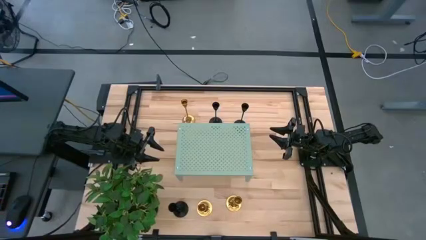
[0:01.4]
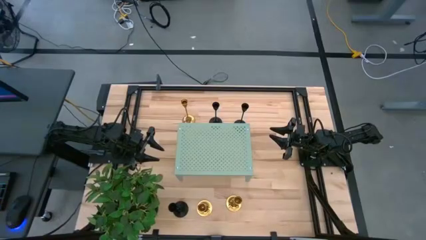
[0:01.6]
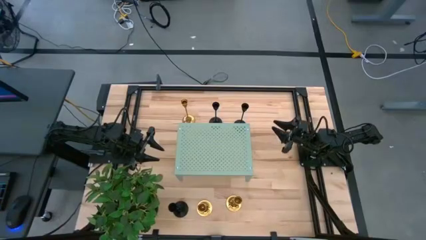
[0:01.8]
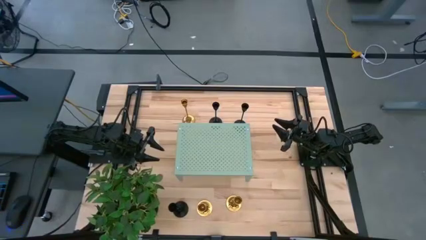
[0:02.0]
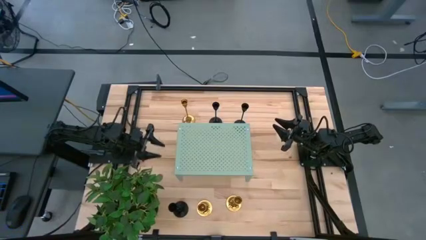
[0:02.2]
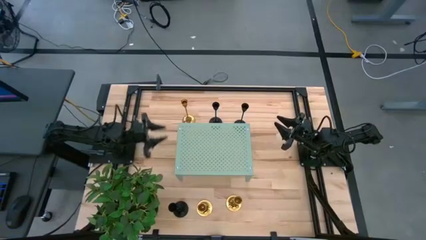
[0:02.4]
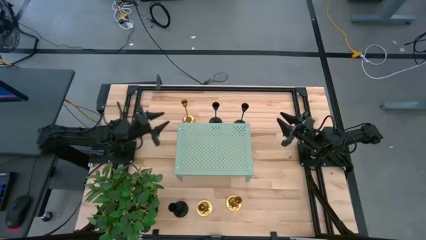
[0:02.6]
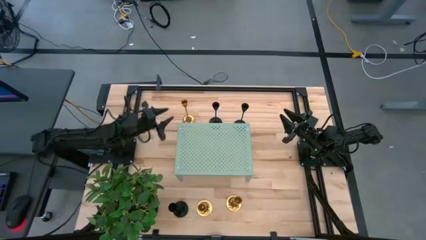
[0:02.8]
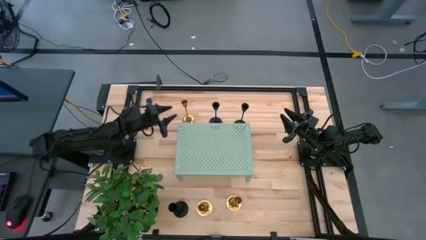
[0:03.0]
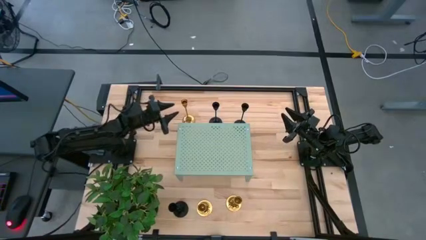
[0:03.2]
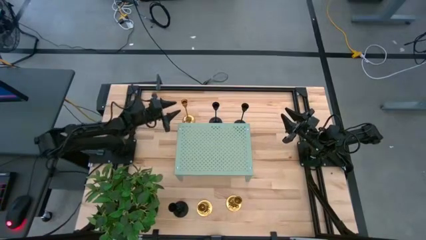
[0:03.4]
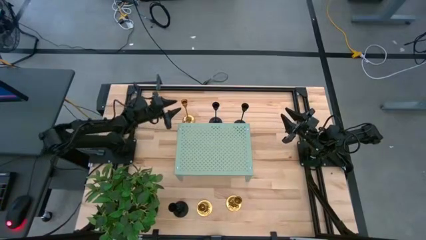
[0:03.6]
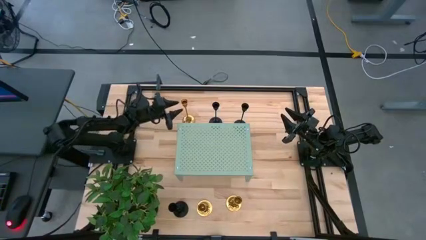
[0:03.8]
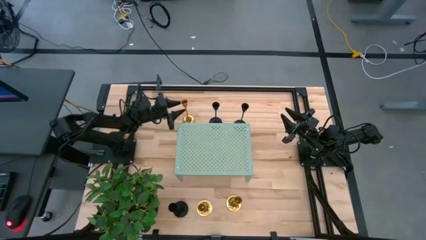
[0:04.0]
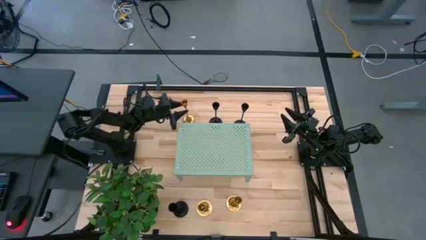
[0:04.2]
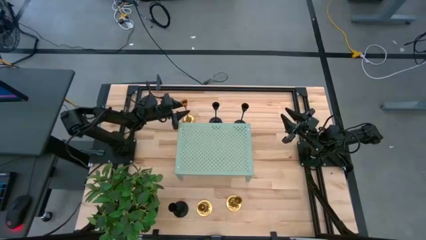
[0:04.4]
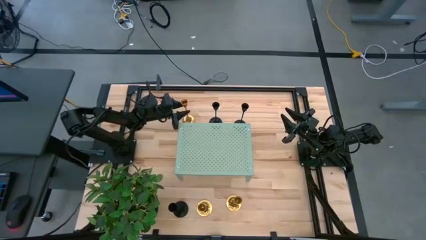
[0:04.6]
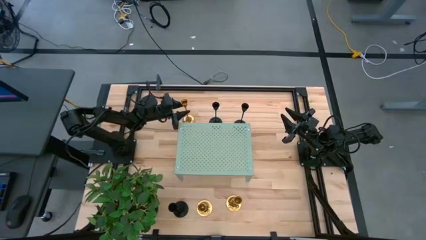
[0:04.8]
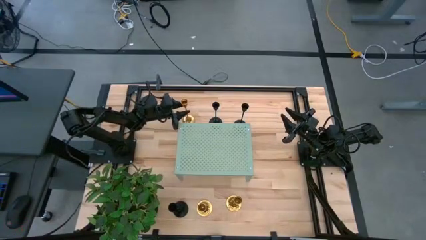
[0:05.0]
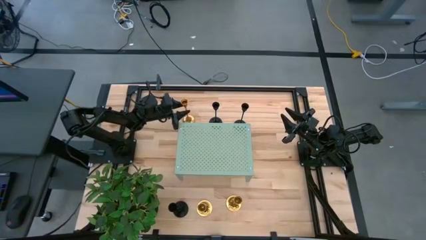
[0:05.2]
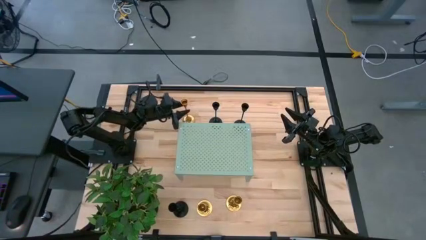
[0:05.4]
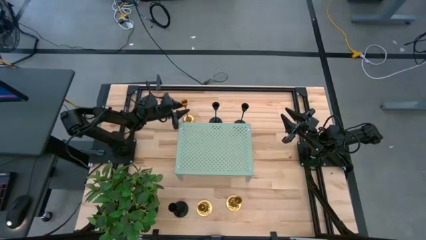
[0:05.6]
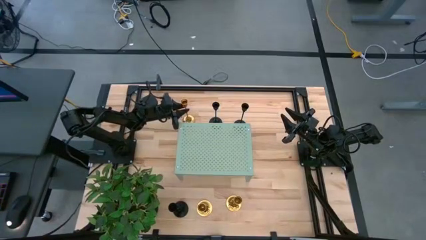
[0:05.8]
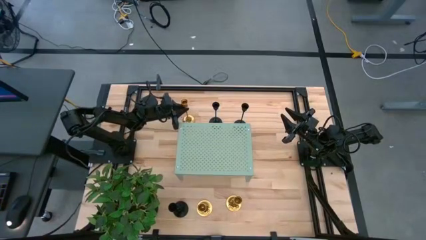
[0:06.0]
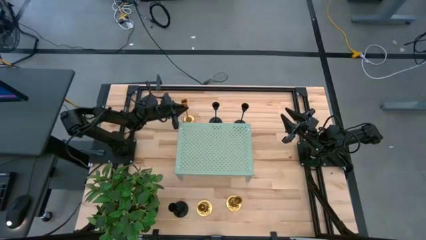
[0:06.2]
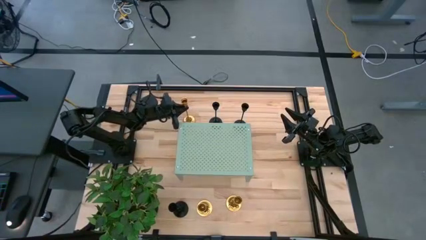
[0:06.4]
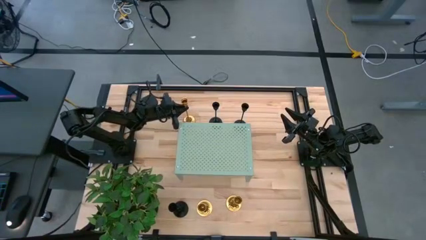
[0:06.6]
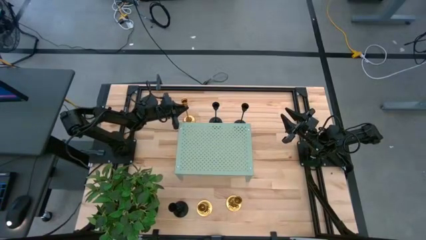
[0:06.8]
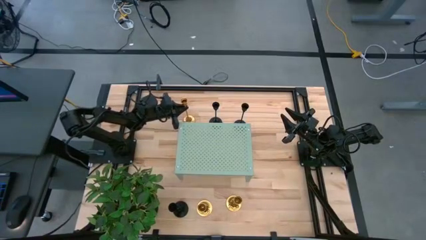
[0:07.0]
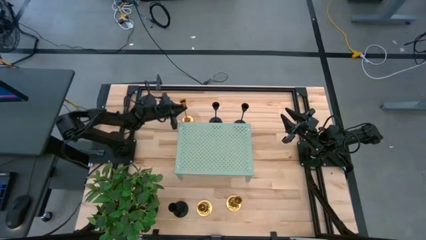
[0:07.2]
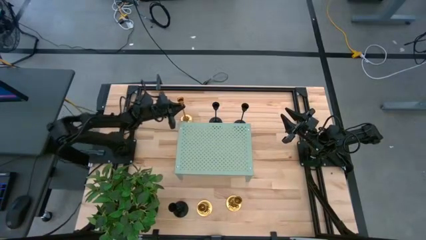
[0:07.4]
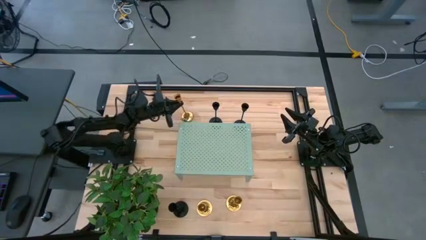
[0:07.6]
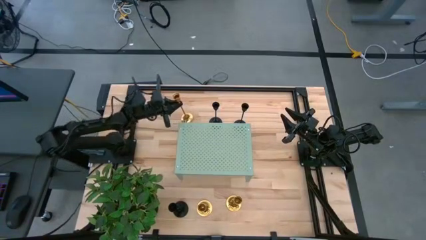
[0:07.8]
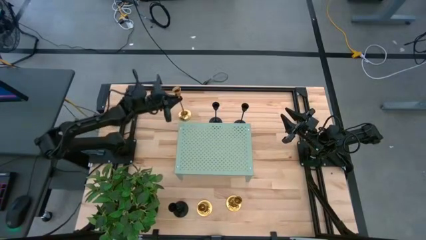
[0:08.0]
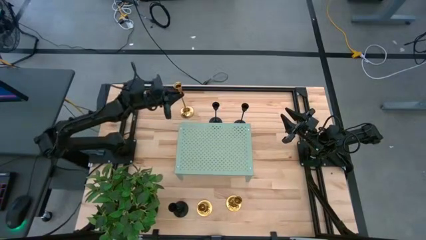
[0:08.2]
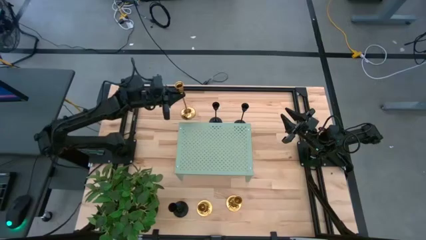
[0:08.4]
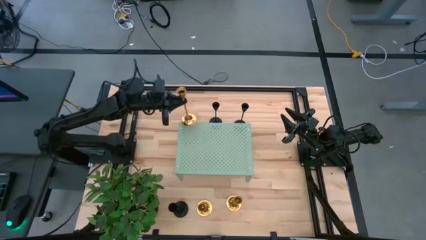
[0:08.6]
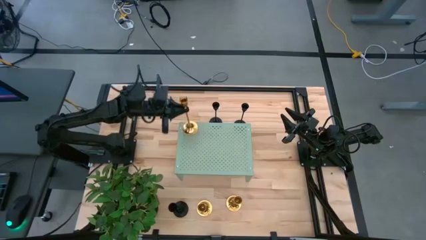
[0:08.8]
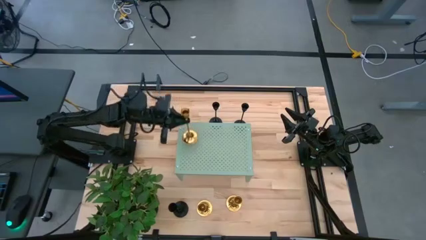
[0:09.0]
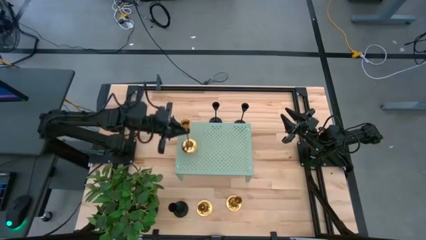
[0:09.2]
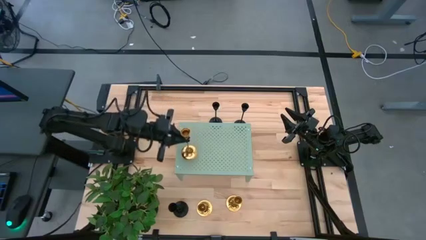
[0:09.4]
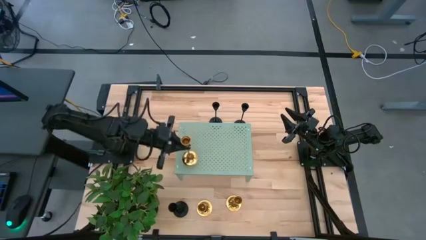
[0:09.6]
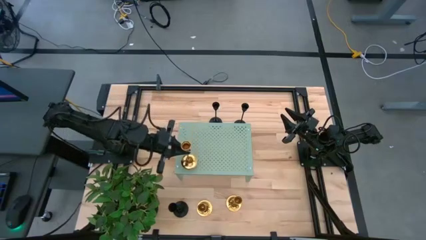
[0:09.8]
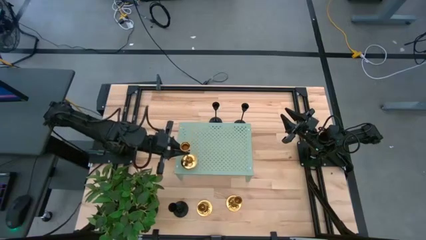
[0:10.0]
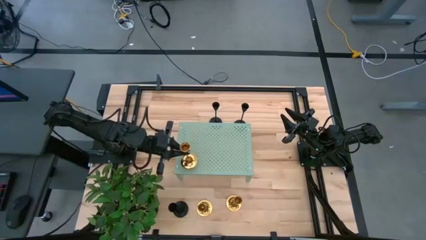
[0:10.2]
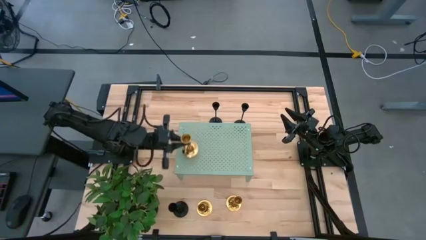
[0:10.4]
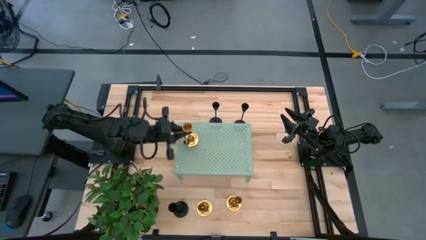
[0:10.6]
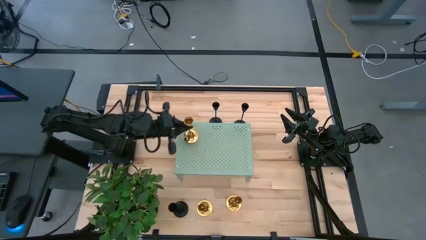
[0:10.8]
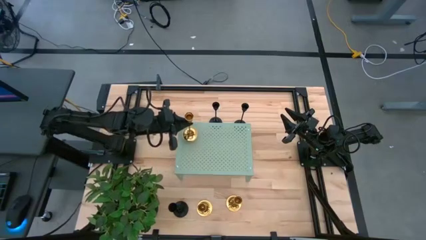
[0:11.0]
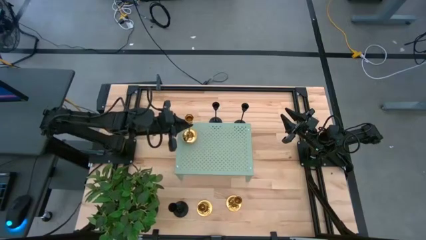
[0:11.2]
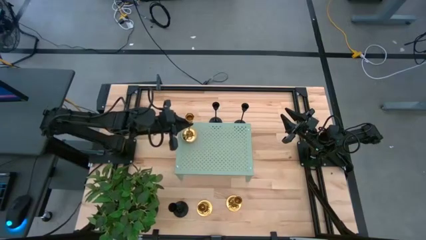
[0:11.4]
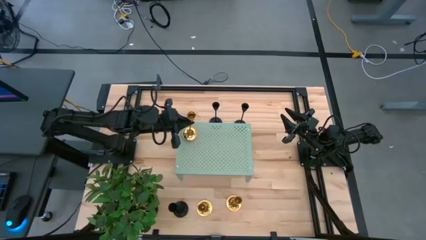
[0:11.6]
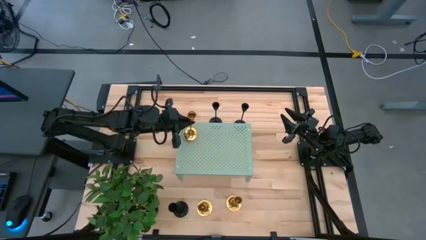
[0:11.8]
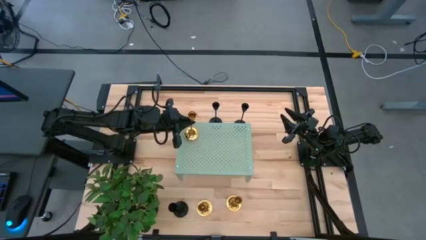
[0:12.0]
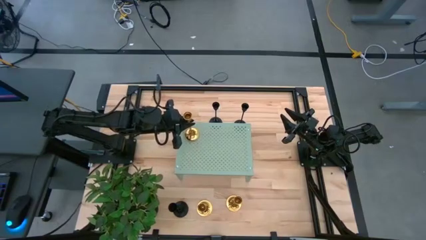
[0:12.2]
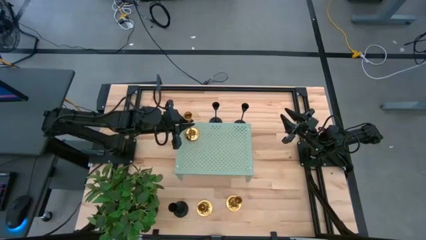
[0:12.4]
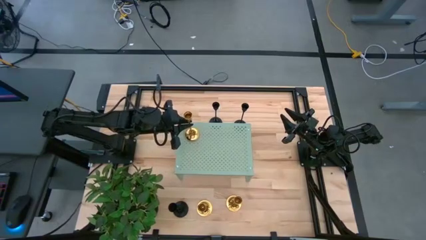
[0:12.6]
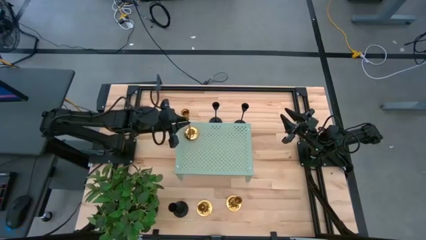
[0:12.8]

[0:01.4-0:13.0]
Task: Pick & Place candle stick holders
Put the top left golden candle holder on the shelf
